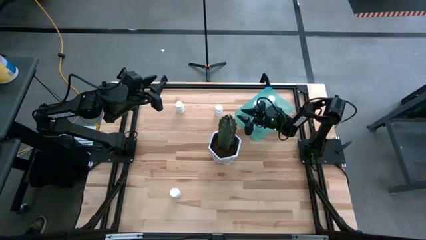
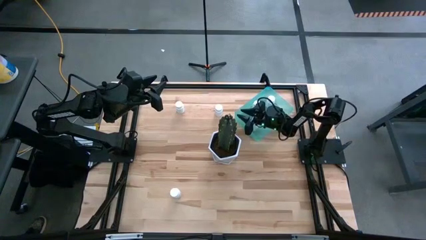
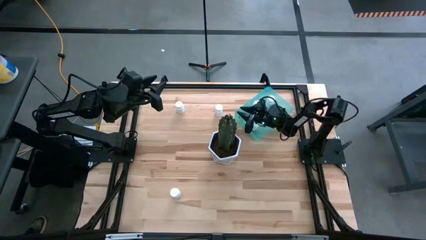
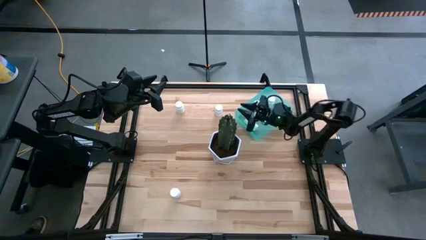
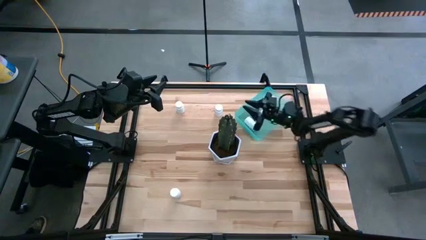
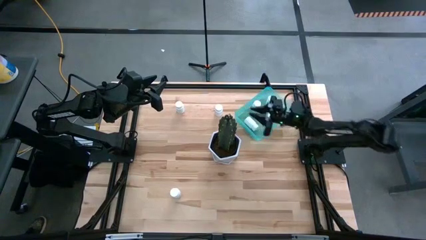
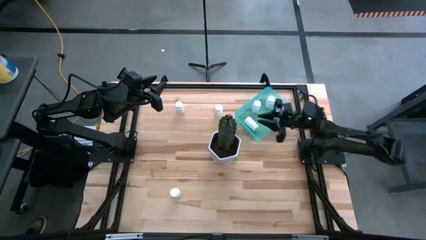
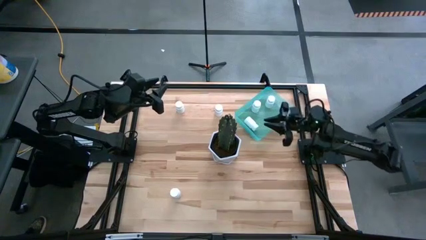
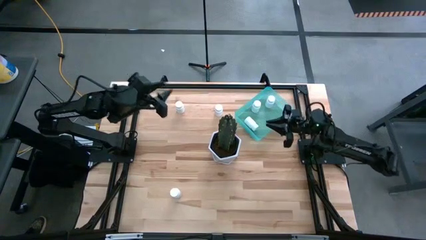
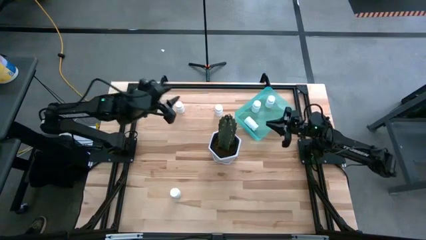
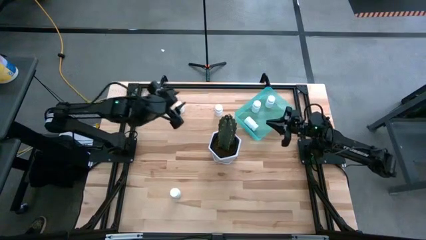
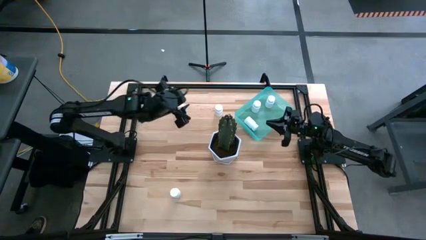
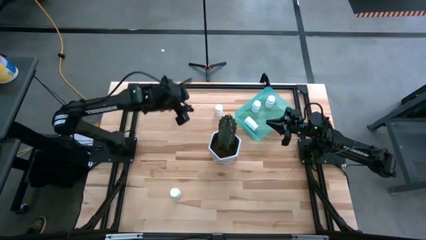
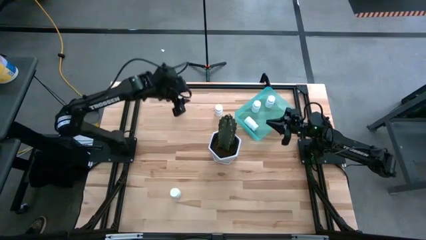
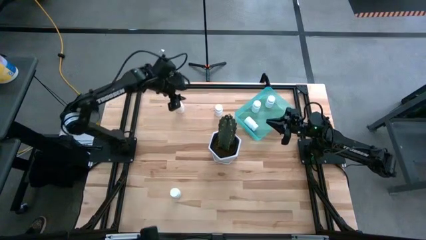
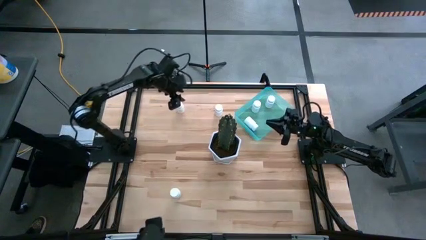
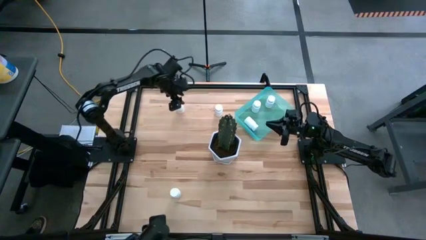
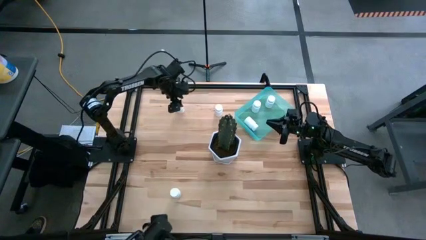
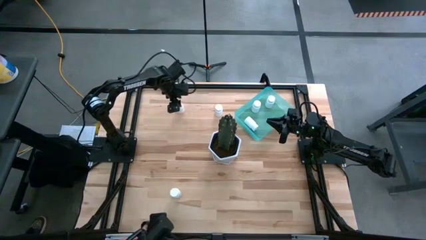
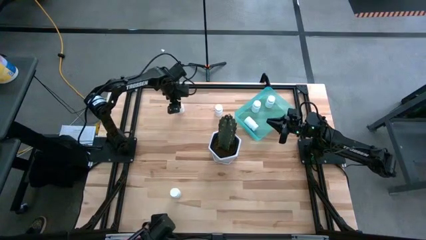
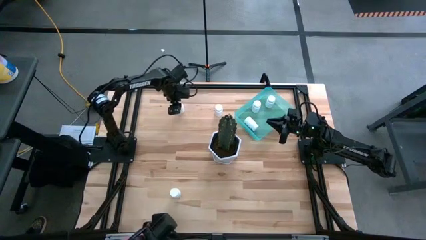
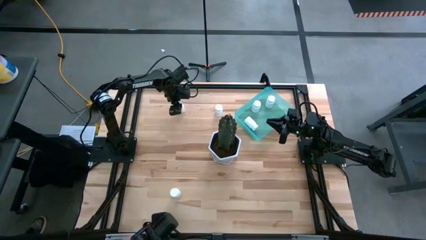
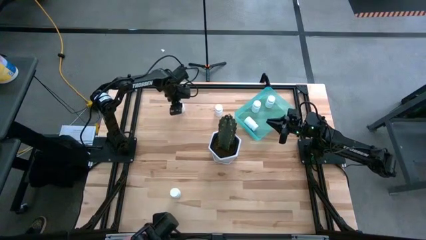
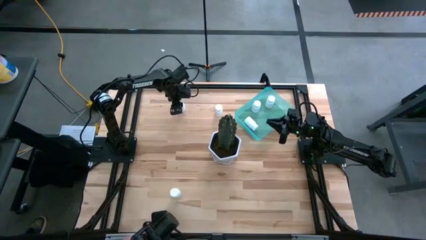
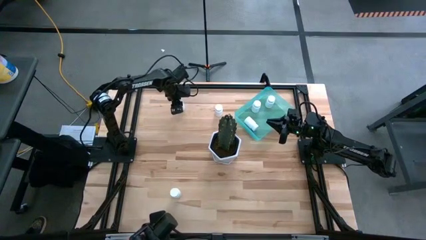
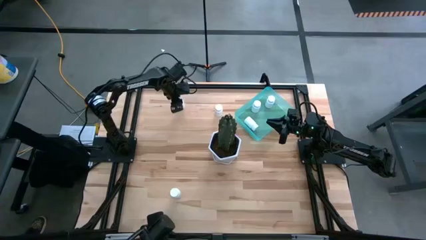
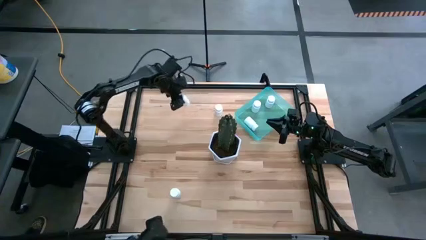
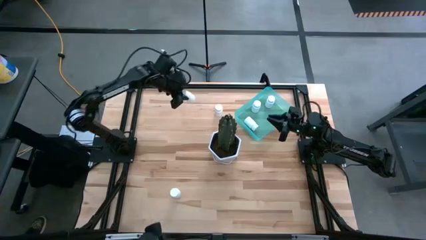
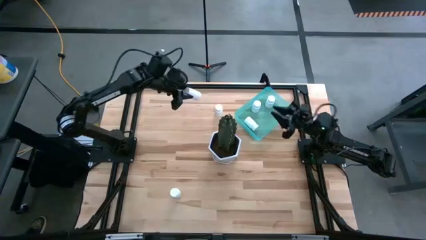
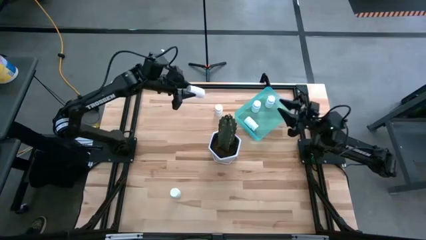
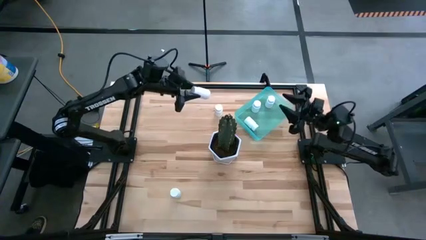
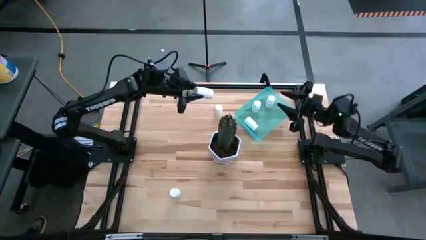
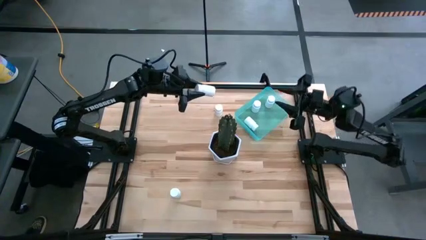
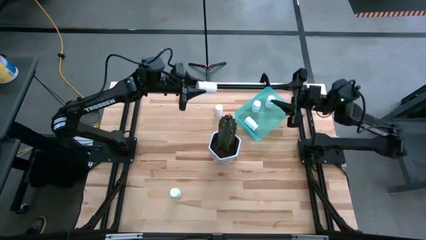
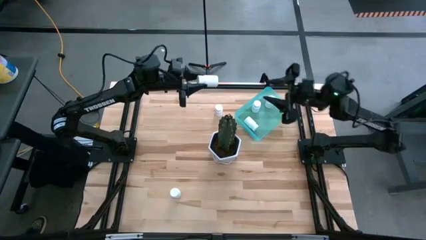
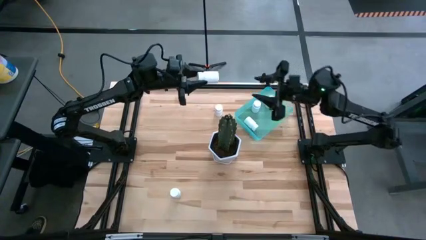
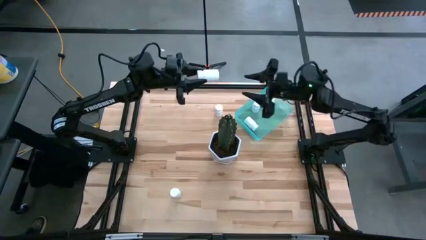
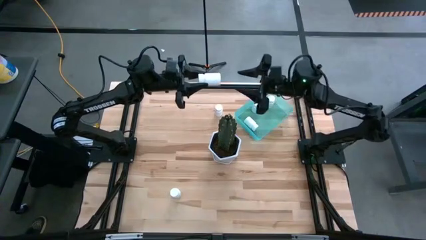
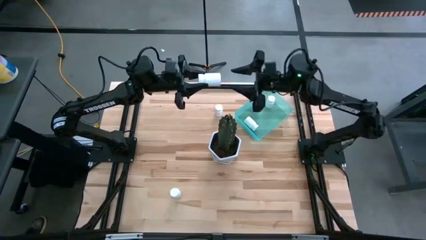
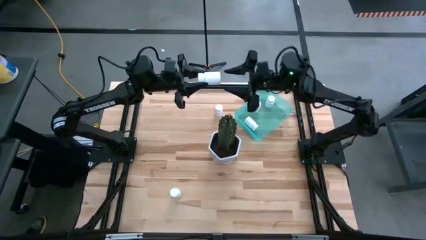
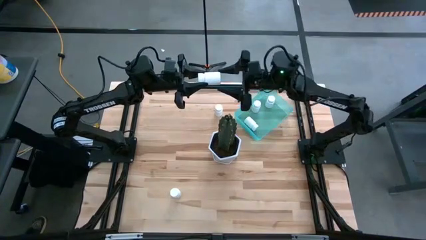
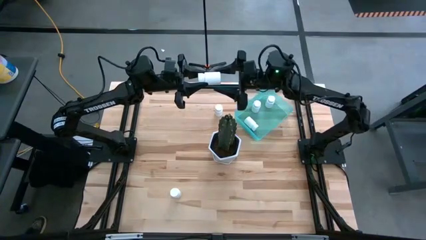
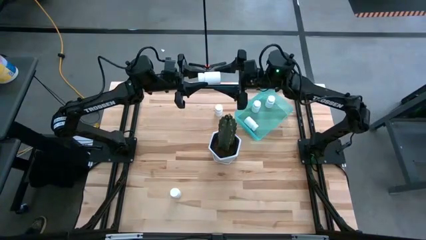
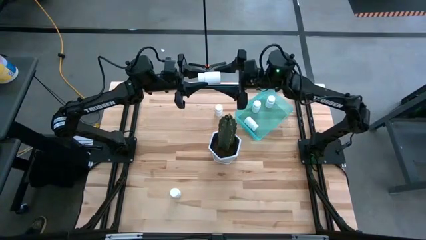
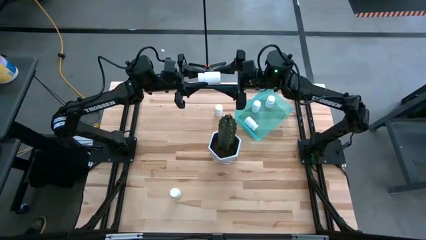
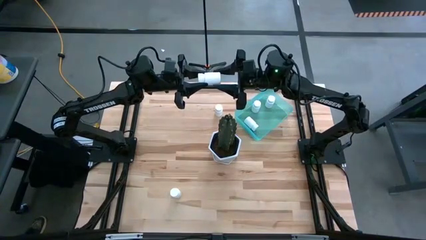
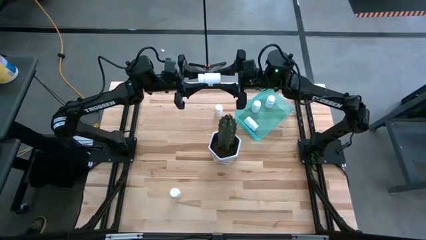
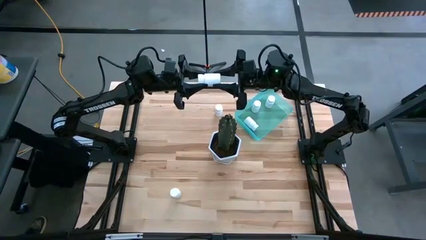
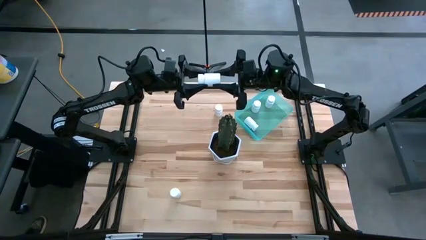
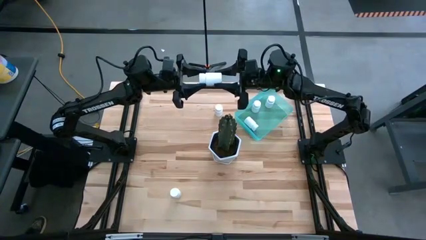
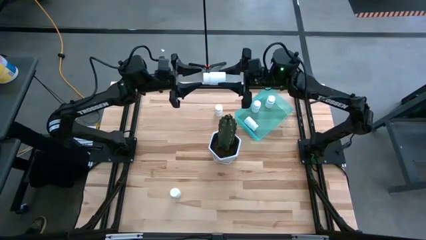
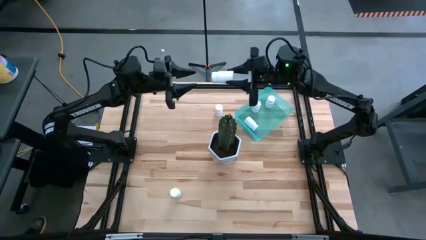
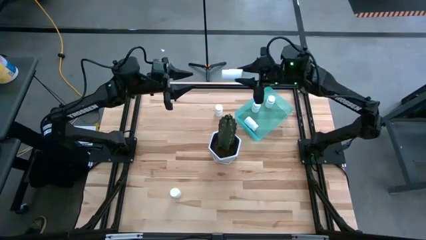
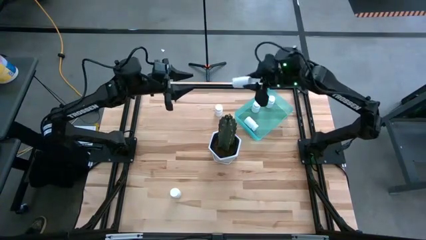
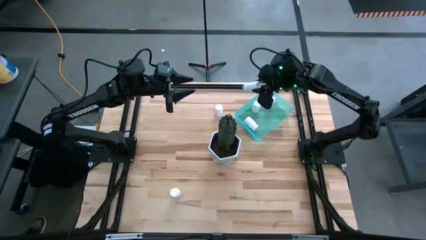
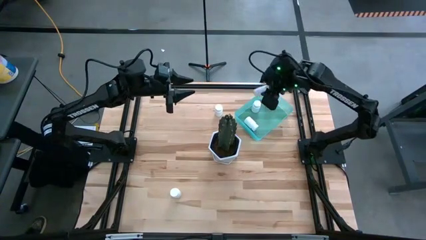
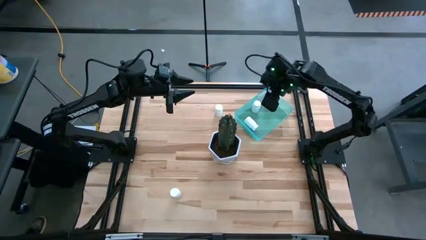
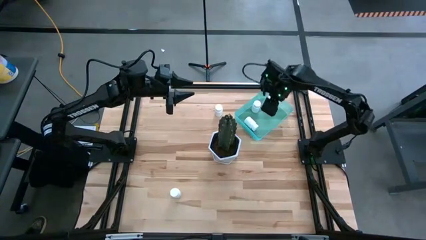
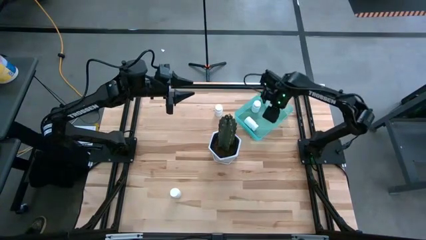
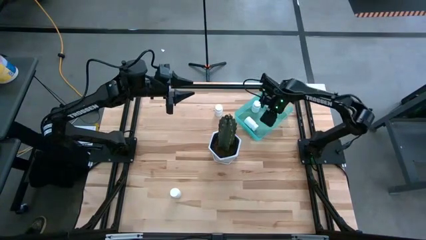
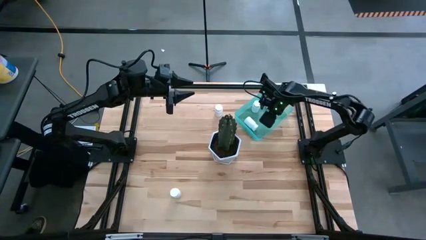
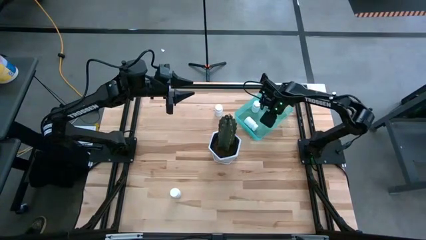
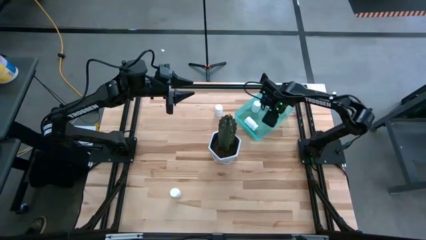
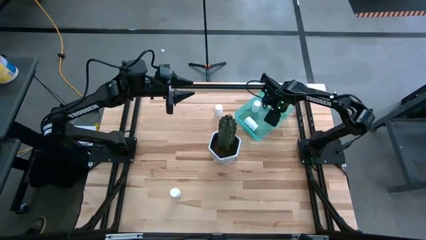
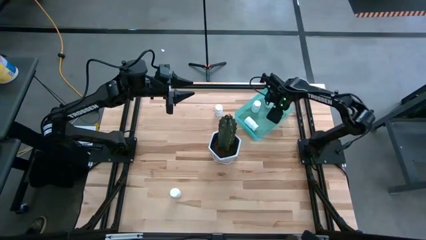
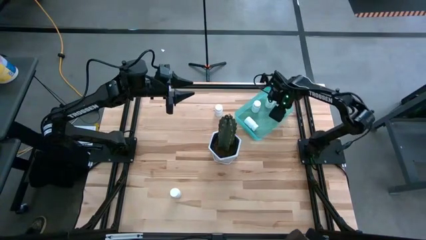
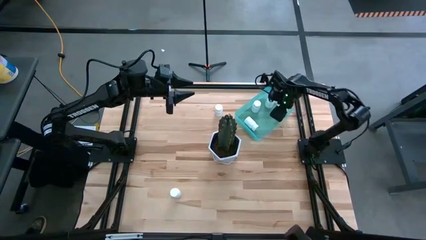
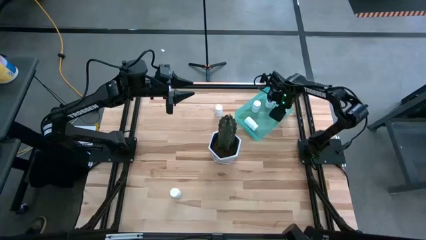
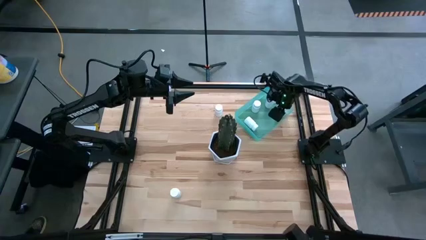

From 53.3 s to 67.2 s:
Task: Pick and place pill bottles into a basket
Put the white medicine bottle into the blue bin

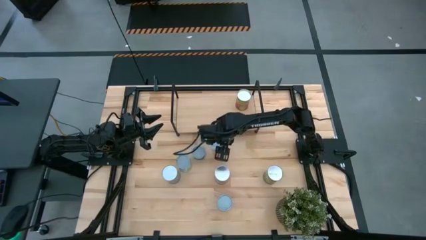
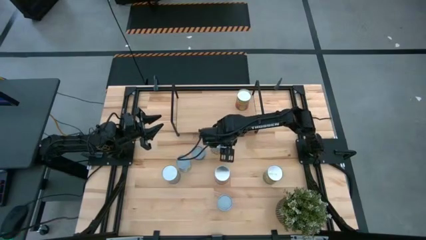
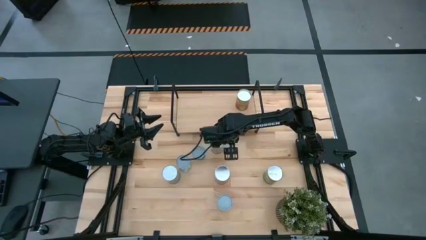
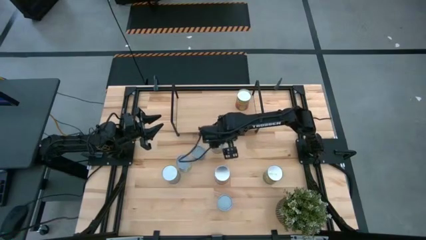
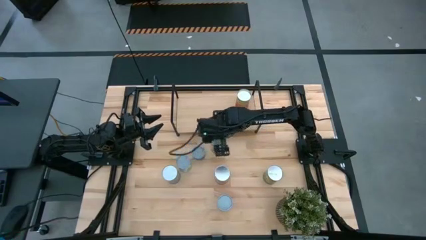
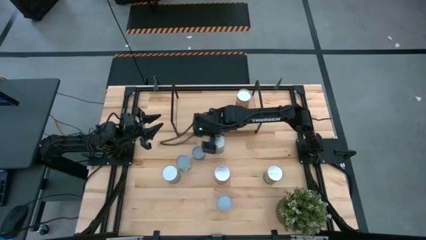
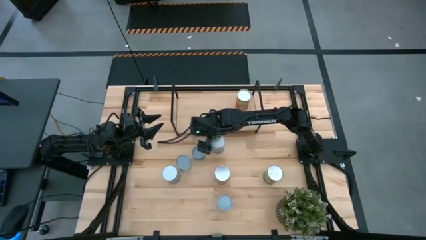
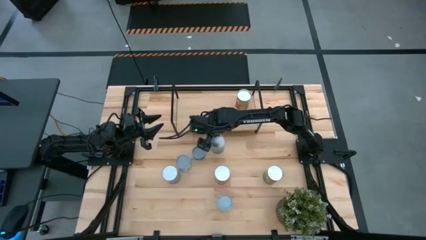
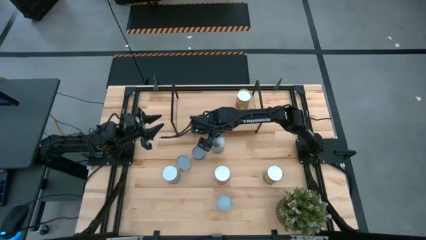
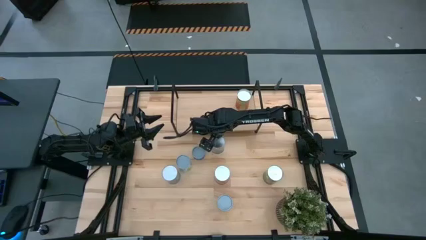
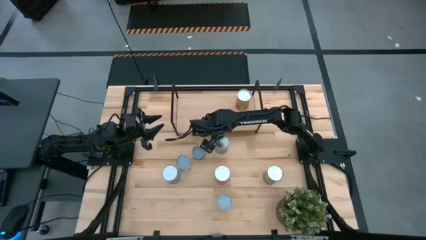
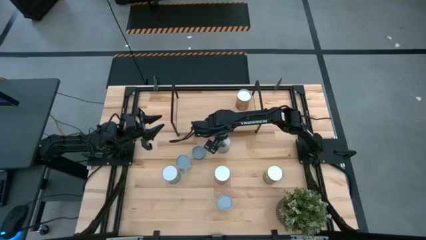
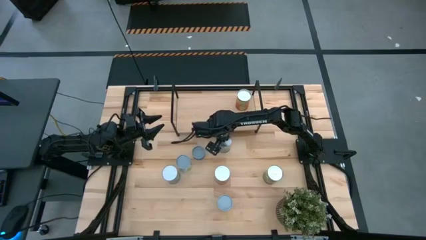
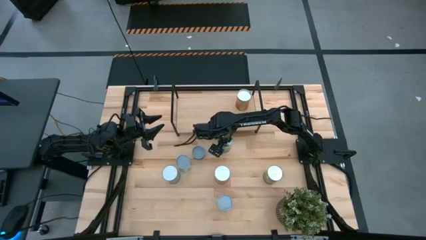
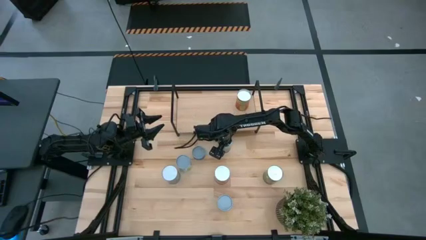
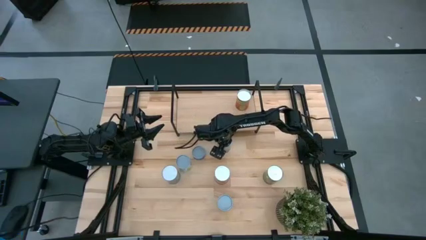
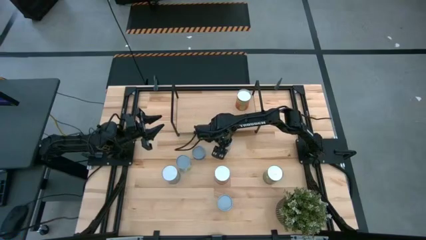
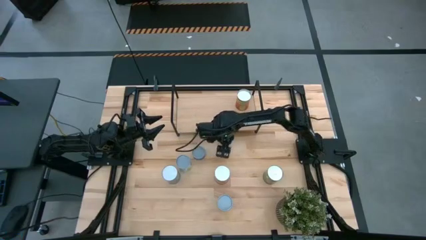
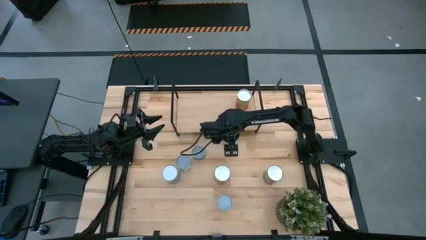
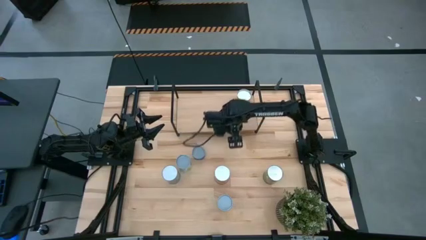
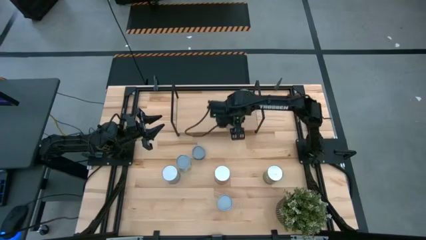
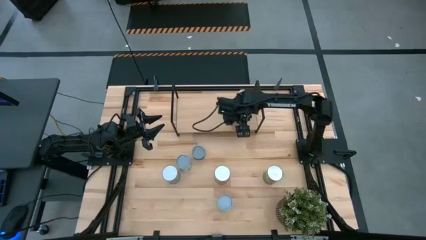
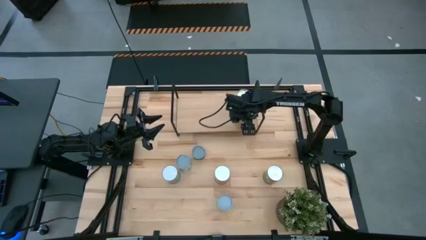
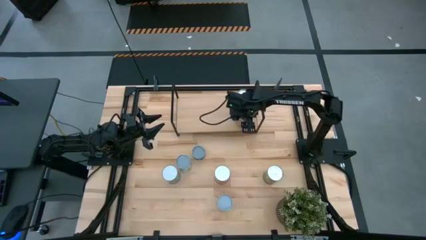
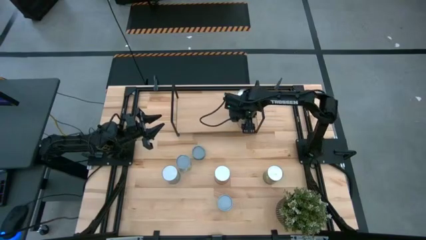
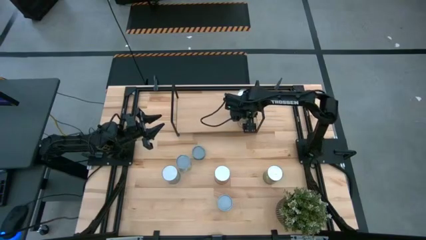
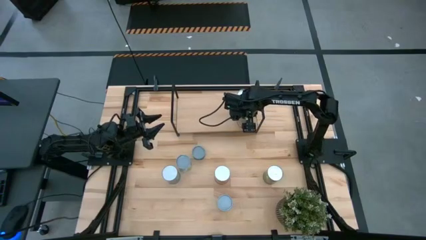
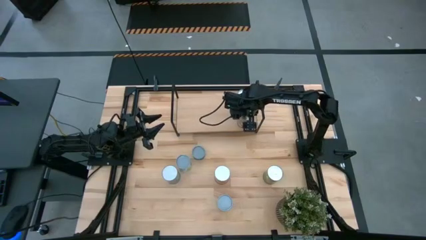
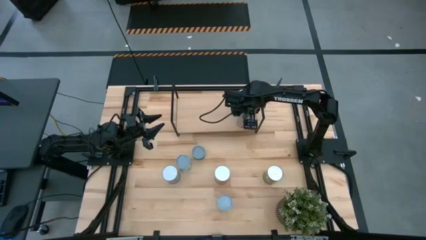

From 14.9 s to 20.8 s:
Task: Pick and place cans onto a shelf
Put the canned peaches on the shelf
